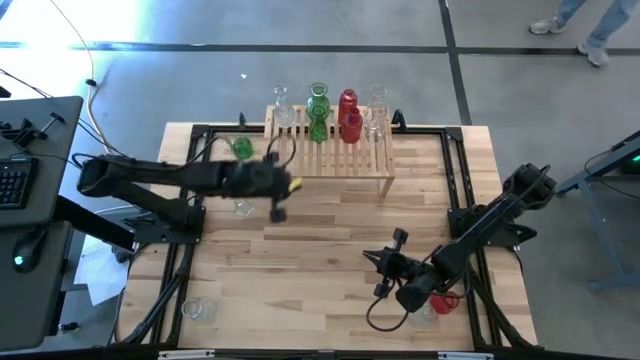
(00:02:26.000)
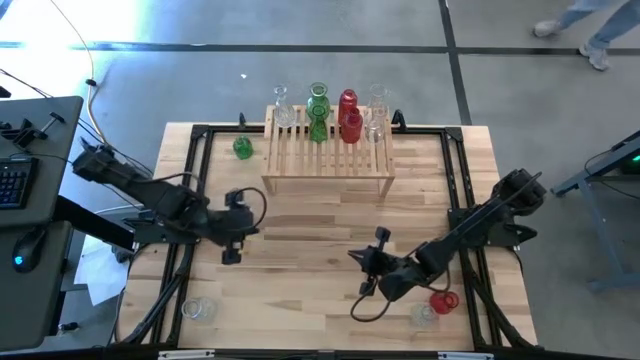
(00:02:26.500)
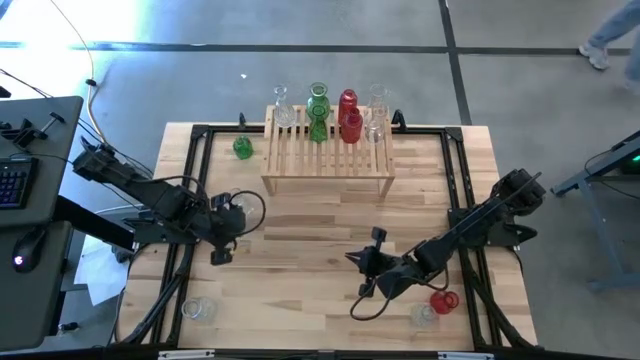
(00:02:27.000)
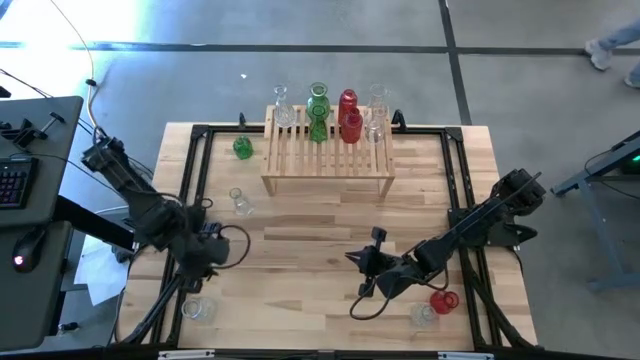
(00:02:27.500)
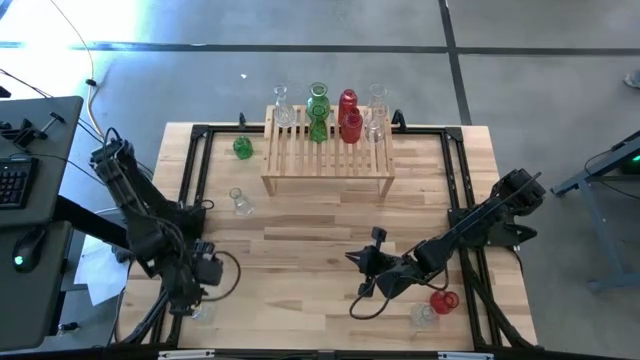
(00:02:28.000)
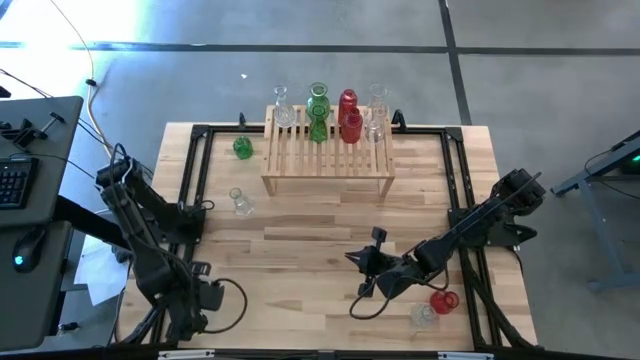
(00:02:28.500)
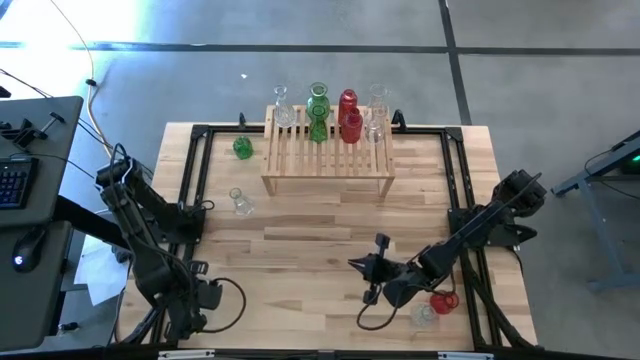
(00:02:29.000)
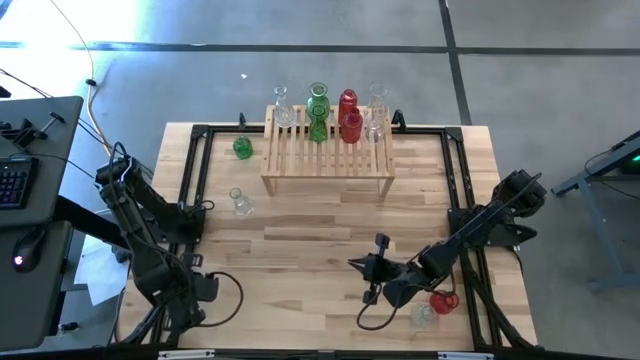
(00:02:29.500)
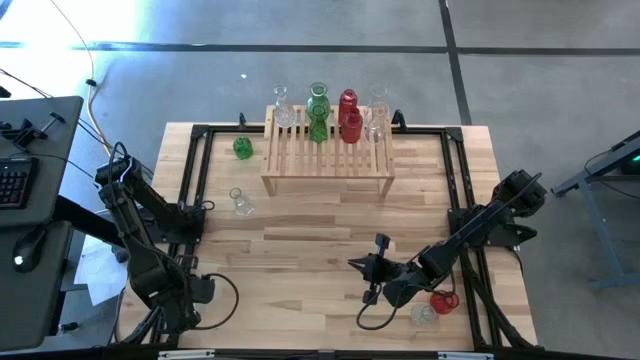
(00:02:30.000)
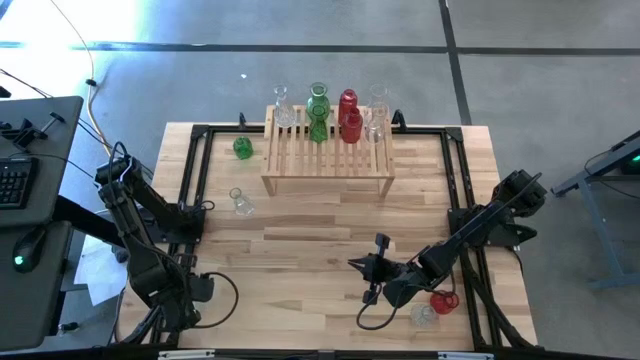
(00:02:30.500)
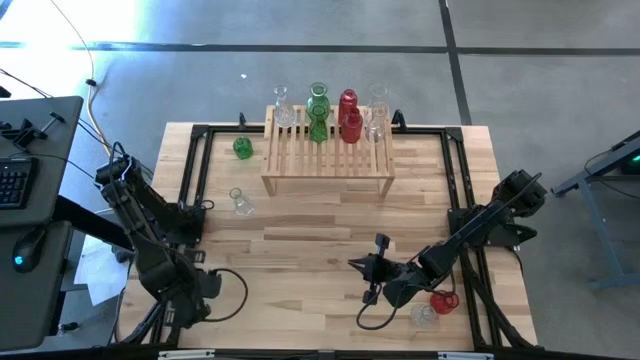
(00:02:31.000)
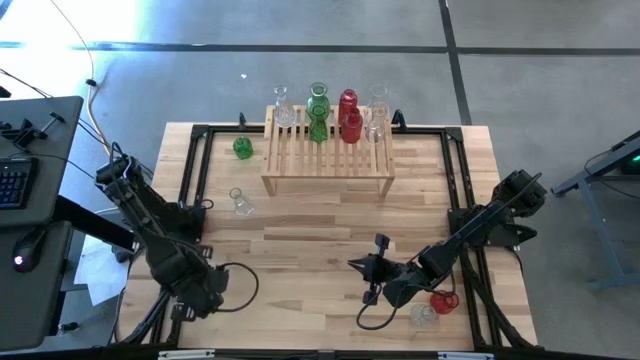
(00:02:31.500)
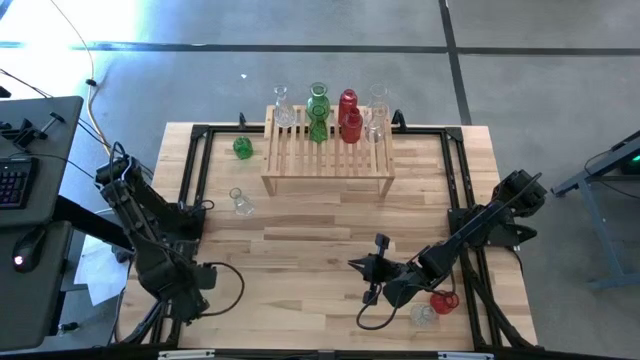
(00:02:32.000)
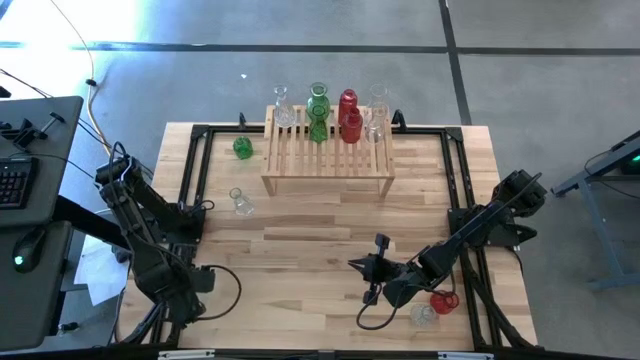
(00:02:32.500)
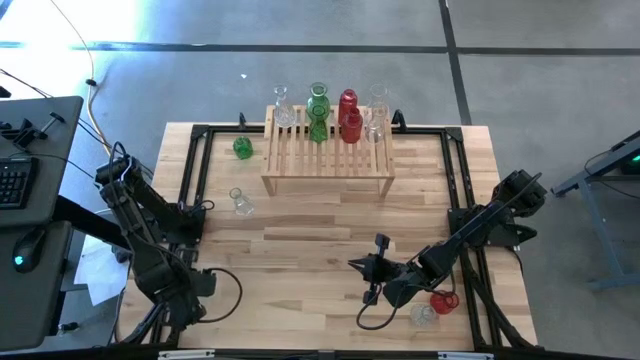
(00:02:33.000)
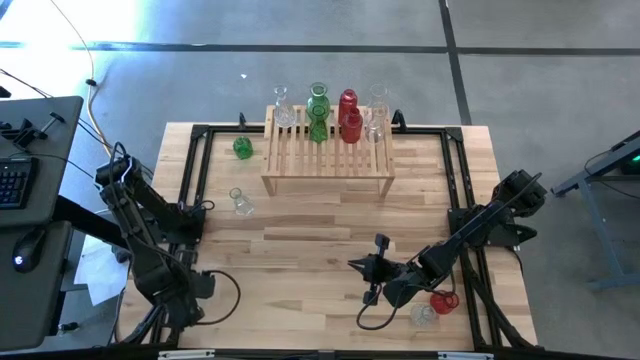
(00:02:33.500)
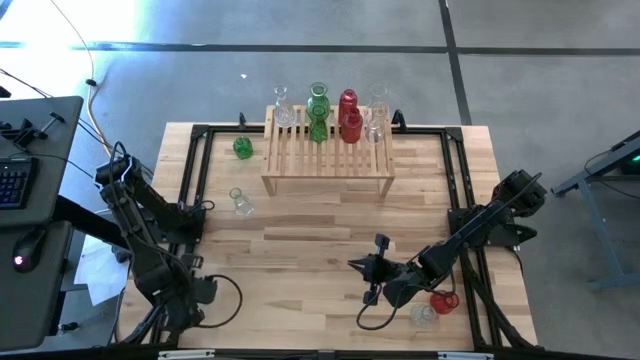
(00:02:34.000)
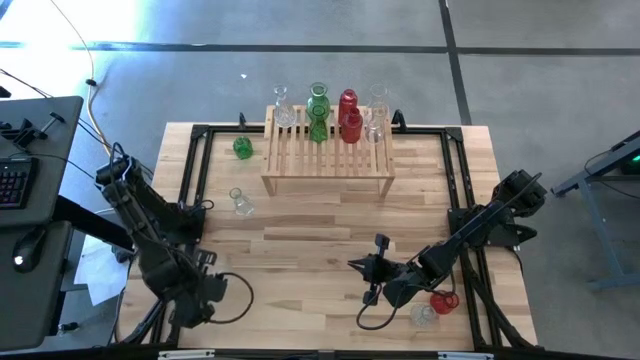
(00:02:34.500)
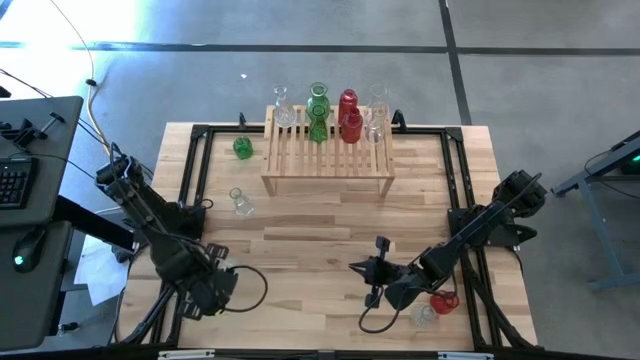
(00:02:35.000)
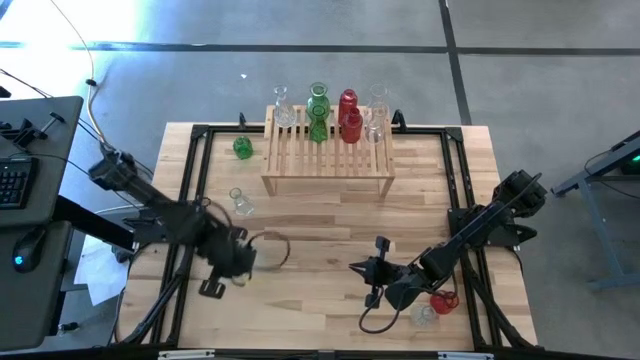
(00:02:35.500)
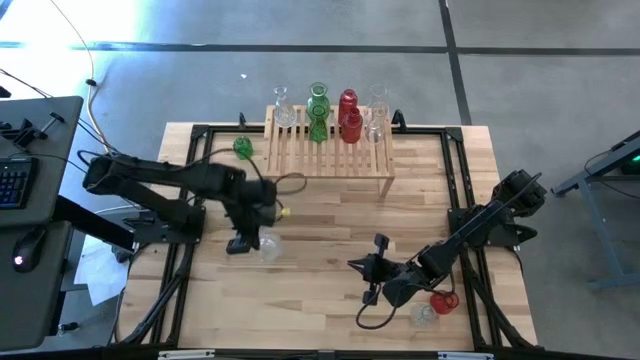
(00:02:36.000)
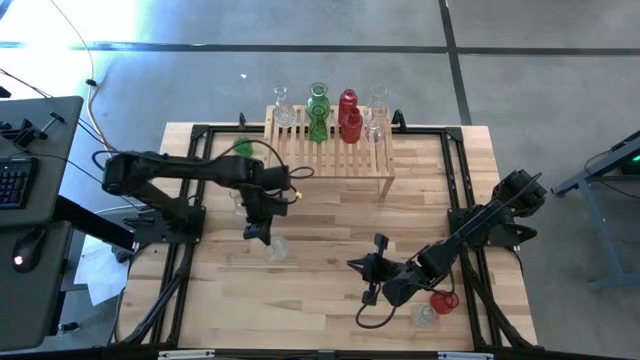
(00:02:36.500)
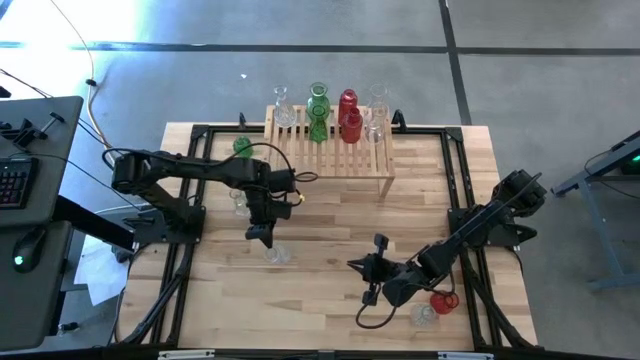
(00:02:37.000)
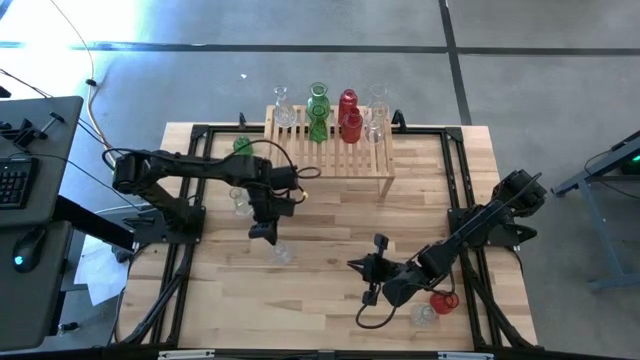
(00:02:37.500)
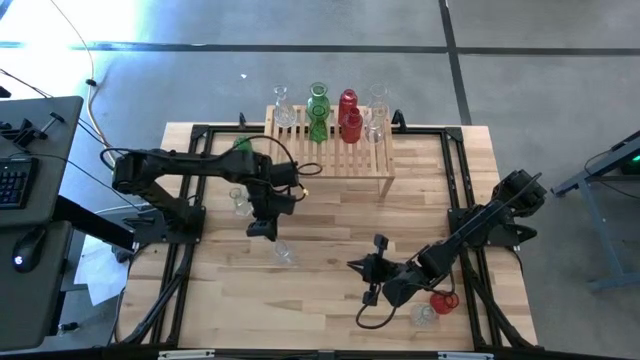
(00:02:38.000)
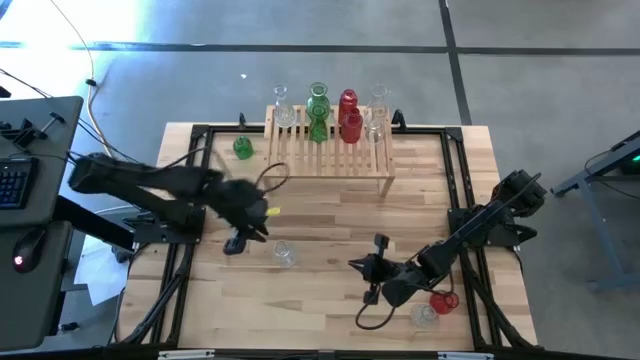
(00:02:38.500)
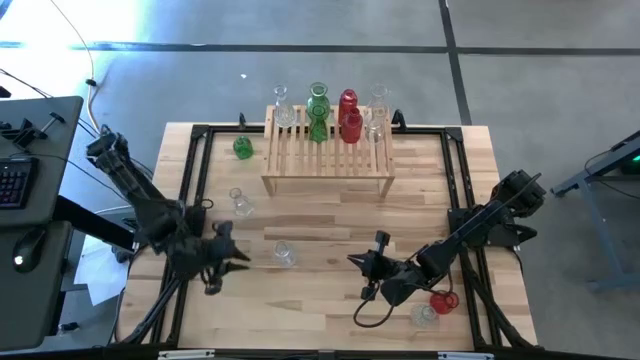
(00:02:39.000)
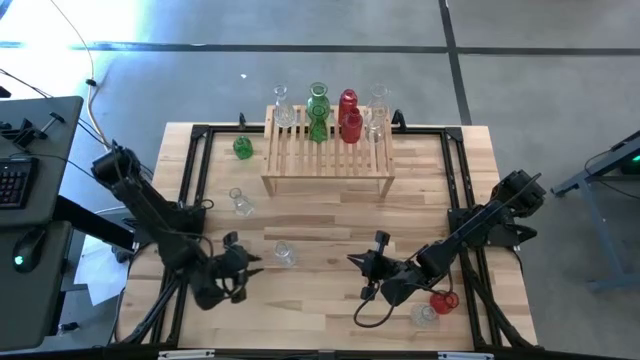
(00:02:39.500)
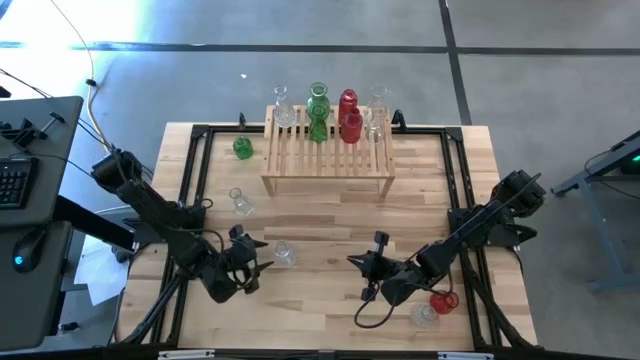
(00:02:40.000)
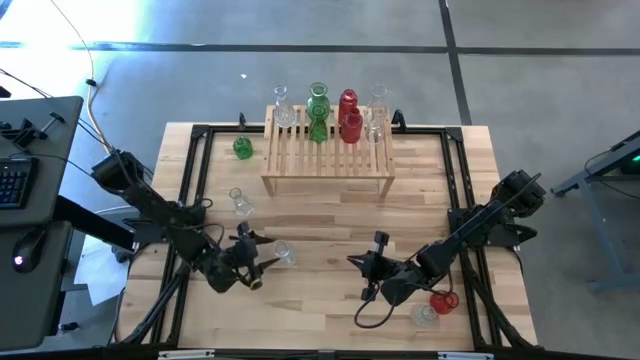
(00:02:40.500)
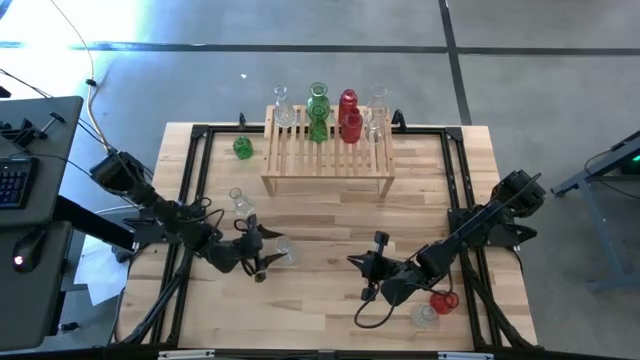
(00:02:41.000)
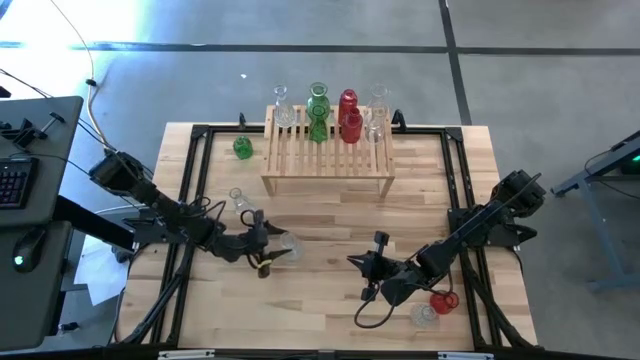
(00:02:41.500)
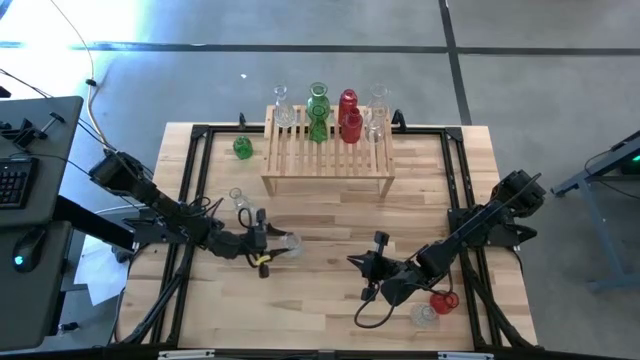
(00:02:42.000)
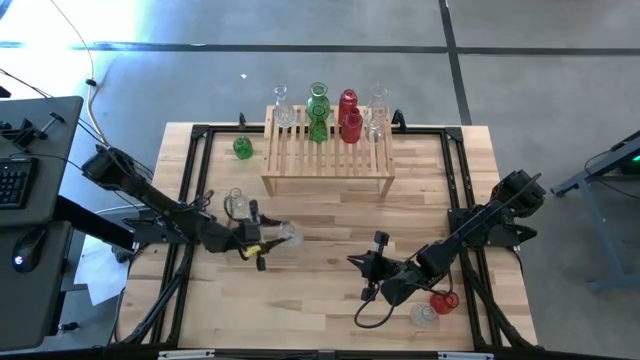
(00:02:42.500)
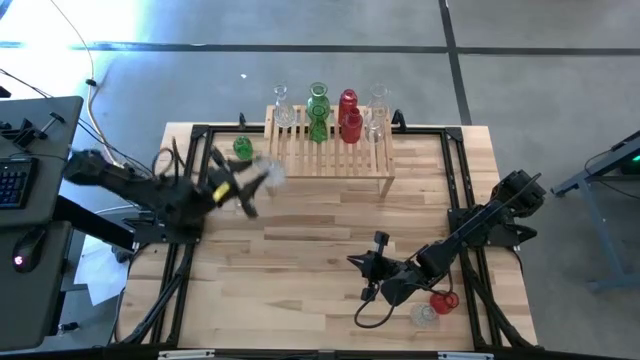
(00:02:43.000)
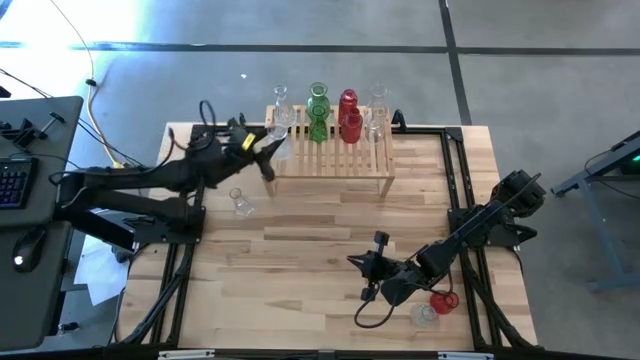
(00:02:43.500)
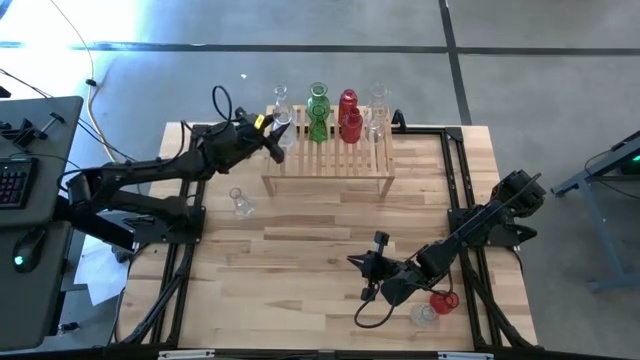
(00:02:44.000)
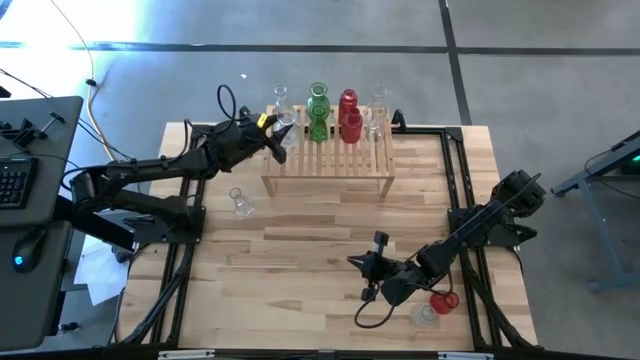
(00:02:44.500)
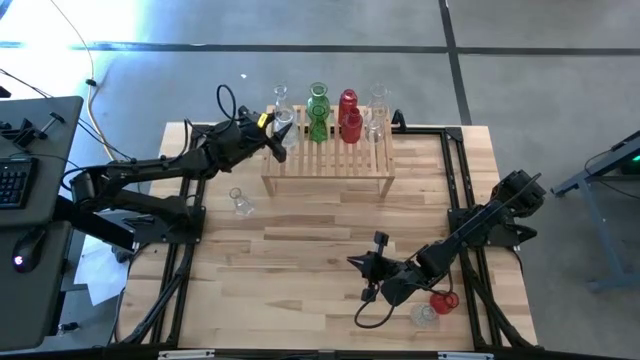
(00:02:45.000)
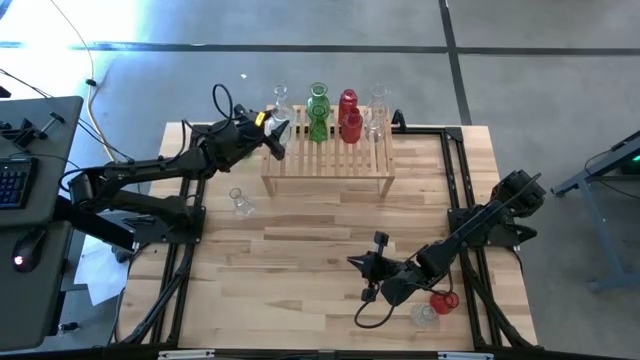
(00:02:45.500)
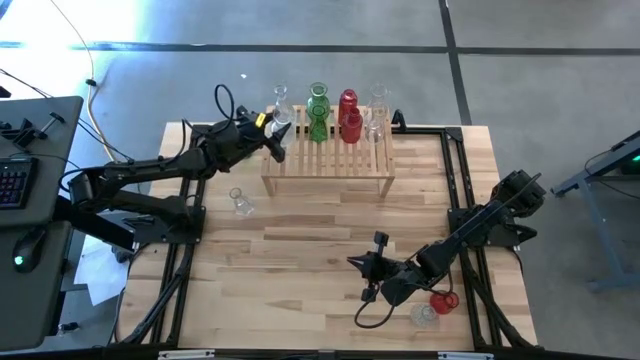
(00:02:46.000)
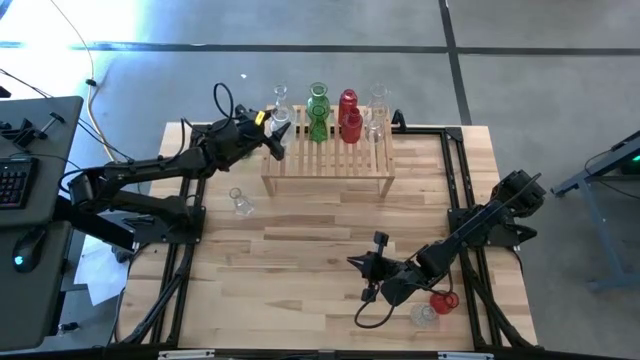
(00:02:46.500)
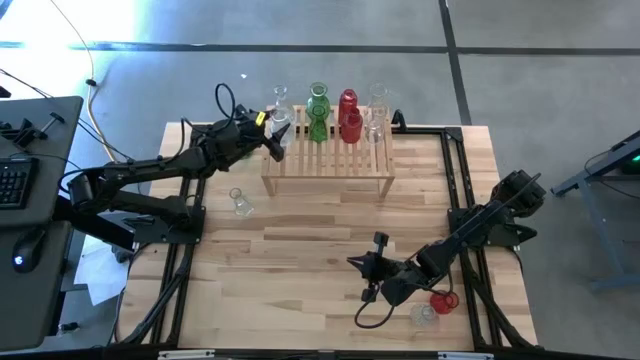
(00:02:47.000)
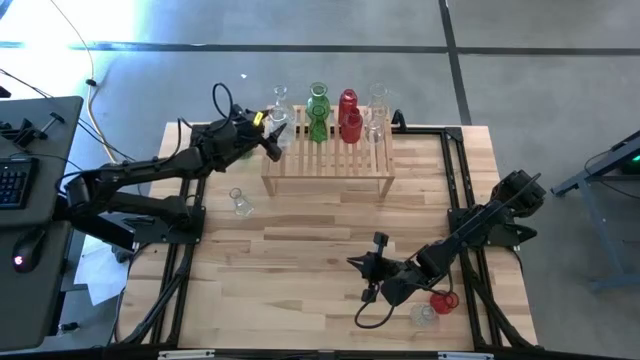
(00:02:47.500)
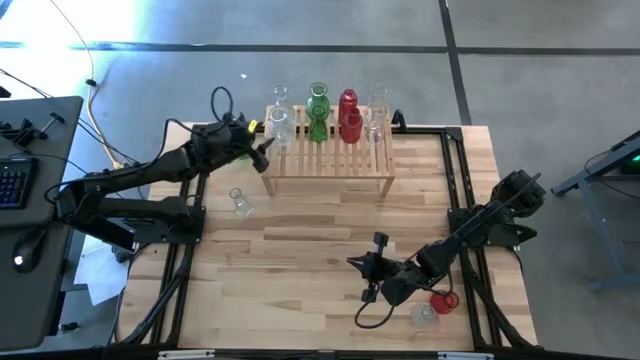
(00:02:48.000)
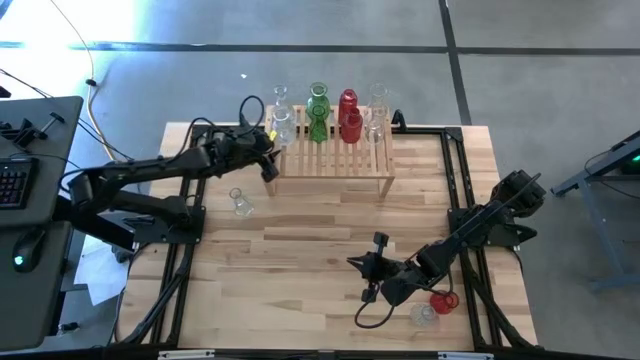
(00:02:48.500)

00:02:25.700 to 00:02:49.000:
Task: sort vases onto shelf
Put the transparent vase on the shelf aligned with the other transparent vase
